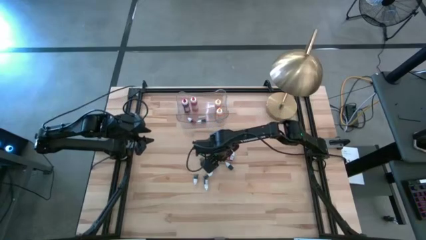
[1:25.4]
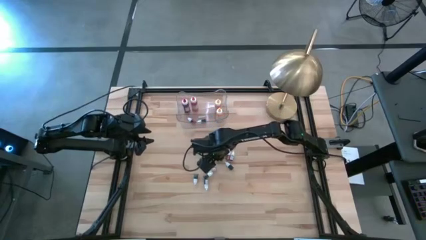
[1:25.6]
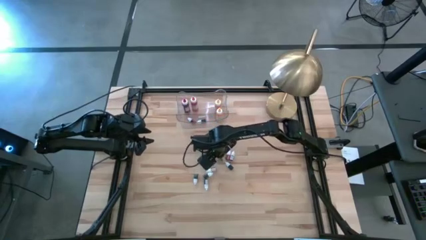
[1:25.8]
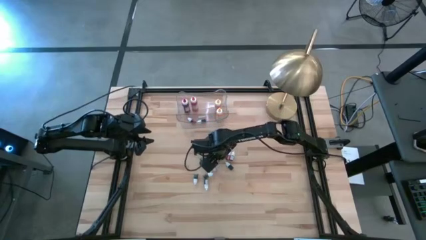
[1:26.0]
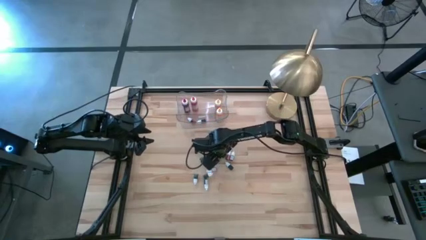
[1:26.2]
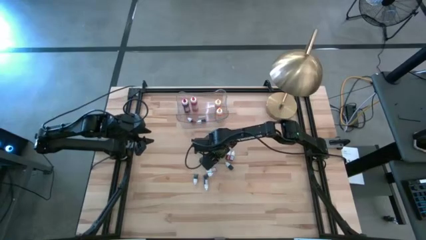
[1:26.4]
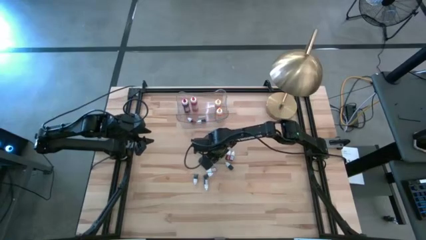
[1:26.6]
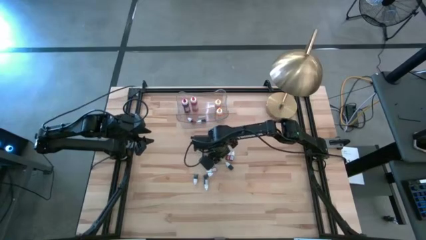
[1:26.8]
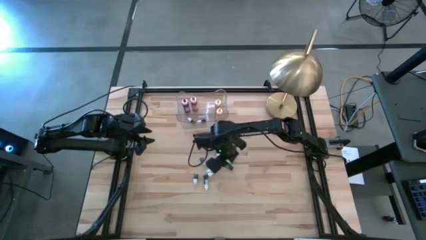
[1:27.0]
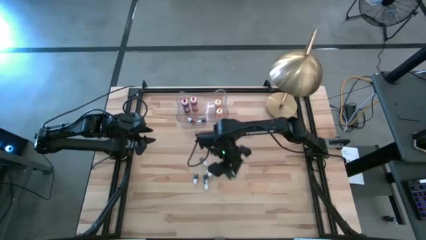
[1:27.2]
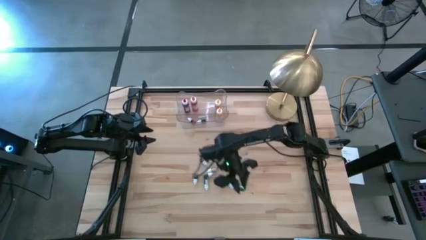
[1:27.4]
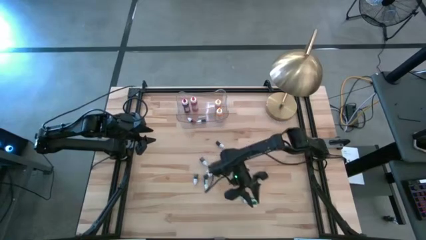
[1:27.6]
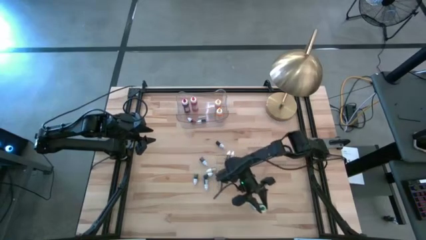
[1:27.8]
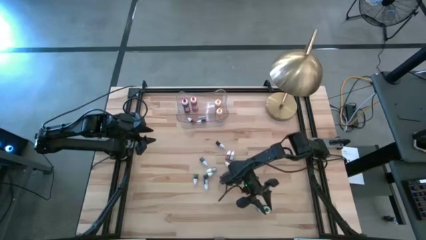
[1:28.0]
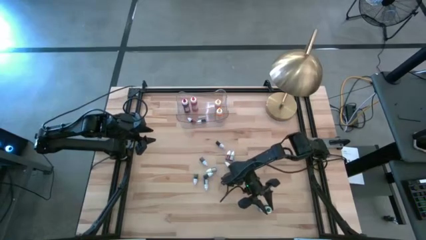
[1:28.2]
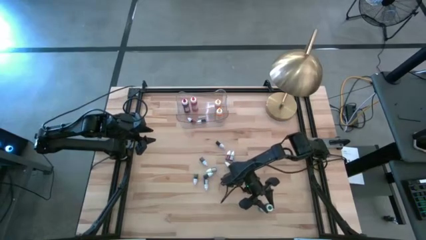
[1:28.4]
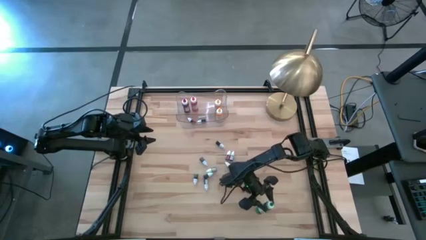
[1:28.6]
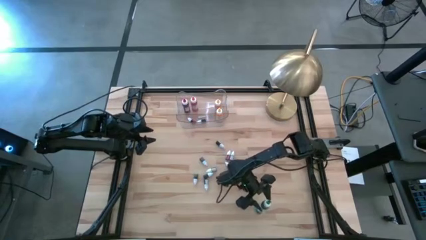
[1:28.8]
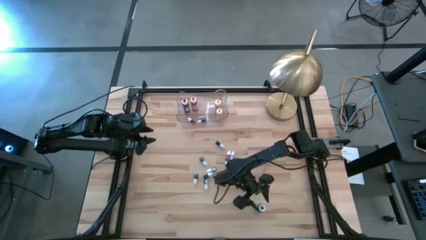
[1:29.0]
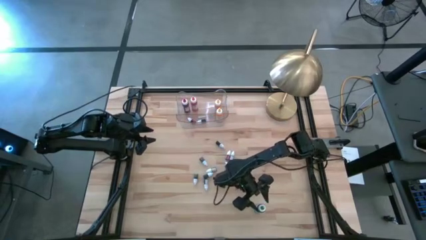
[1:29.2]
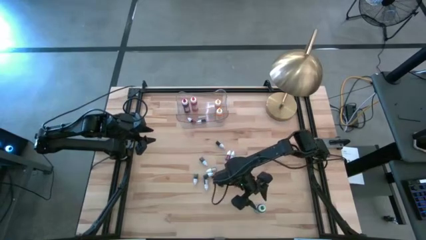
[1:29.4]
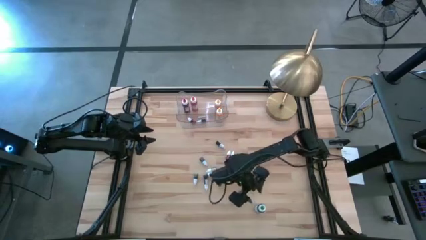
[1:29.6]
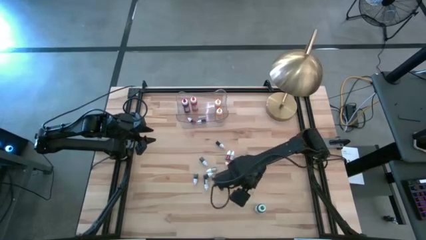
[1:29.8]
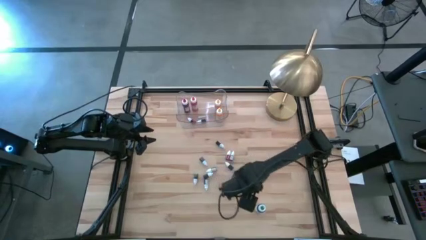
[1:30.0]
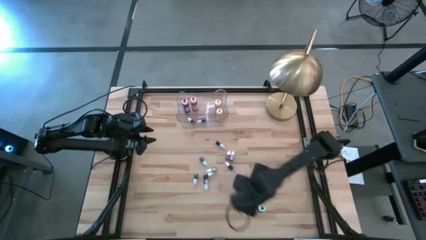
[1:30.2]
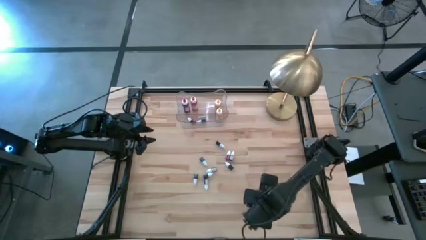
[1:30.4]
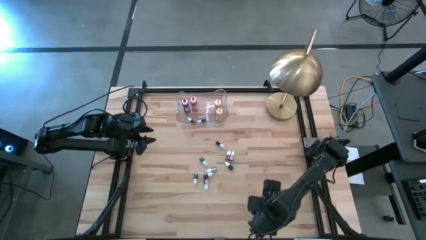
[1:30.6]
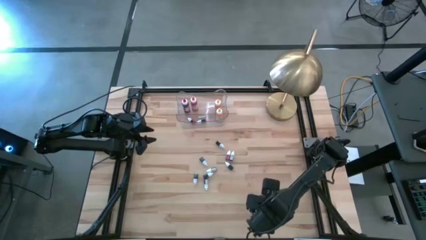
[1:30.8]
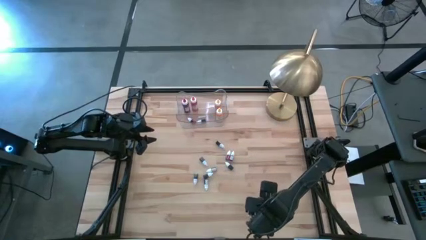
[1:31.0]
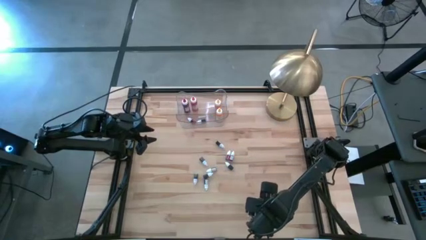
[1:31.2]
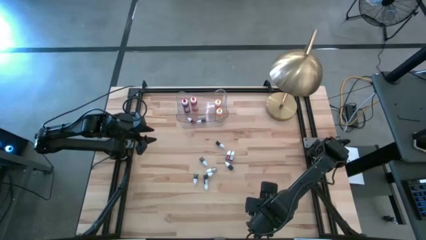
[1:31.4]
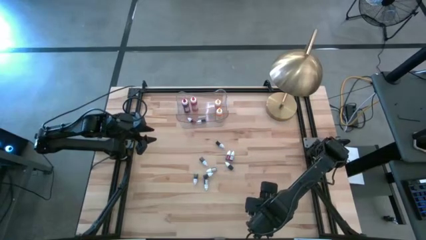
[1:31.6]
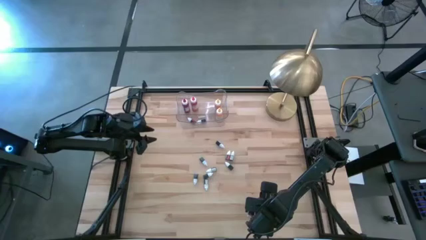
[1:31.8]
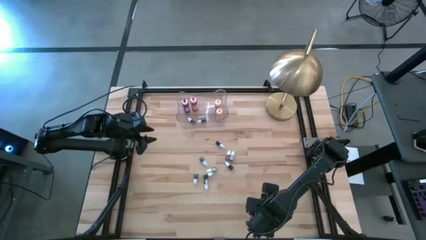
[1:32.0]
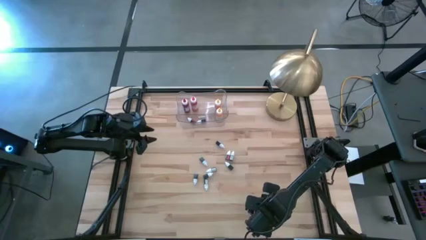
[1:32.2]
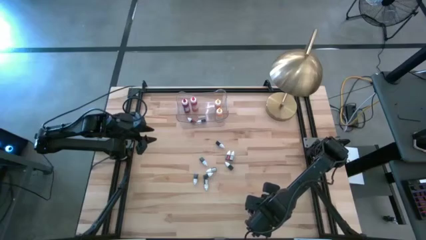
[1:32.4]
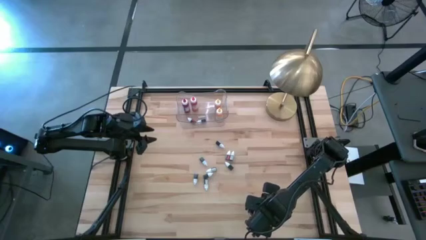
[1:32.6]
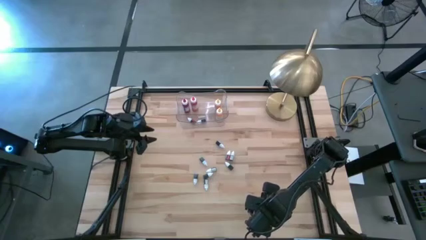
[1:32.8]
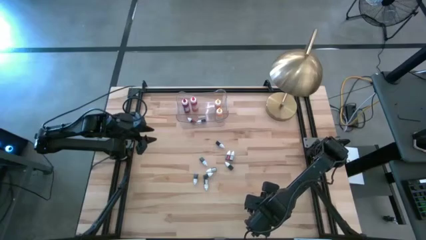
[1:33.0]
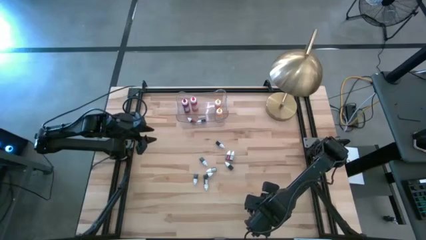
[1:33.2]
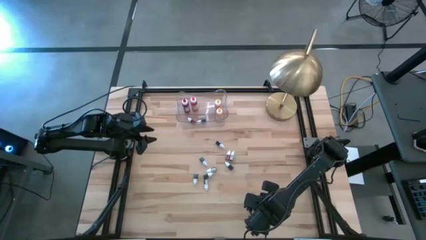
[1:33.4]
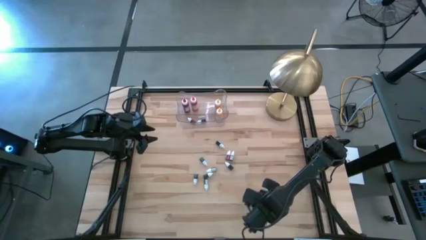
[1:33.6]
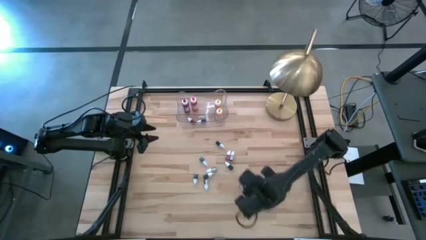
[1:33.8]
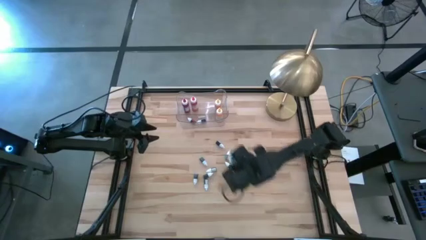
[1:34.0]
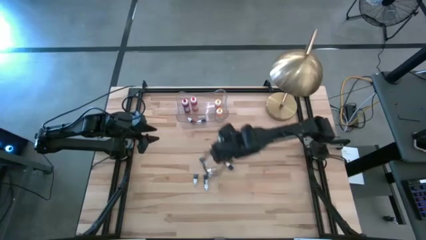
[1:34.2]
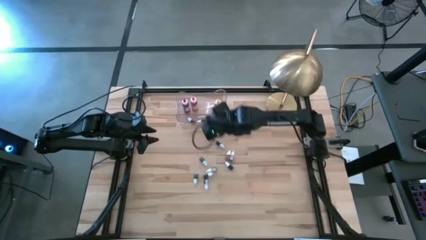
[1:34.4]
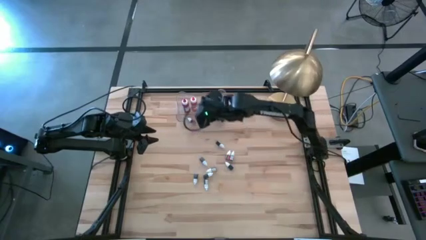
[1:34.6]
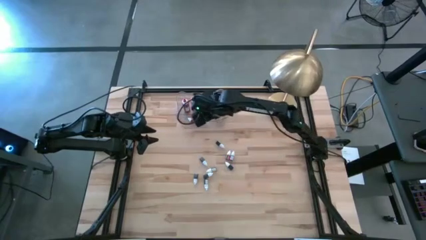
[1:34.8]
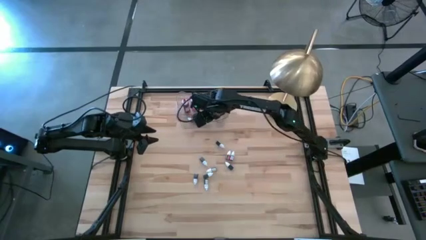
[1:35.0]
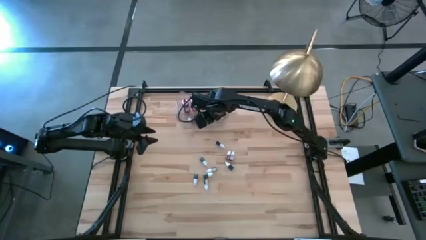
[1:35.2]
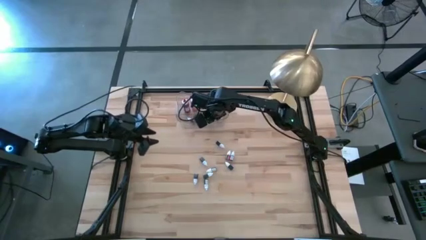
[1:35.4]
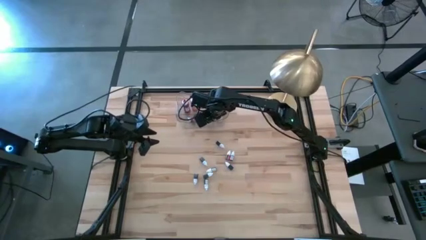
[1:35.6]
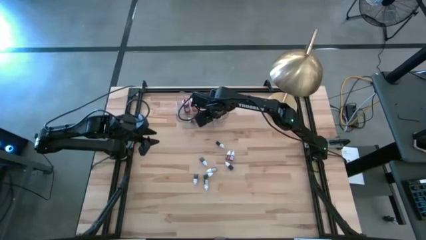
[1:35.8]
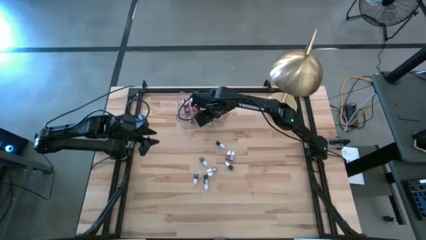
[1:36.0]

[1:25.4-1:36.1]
Task: Pick & Place food coloring
Put the large green food coloring bottle into the transparent bin

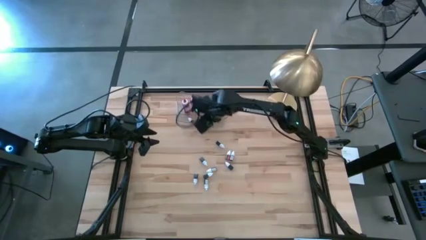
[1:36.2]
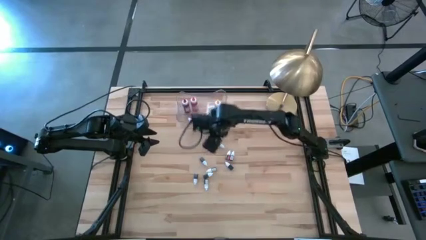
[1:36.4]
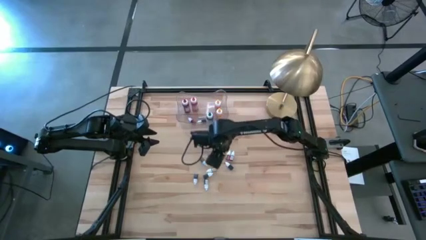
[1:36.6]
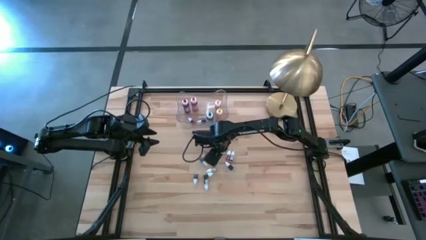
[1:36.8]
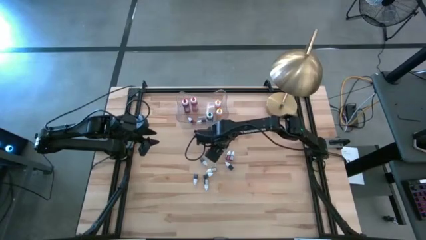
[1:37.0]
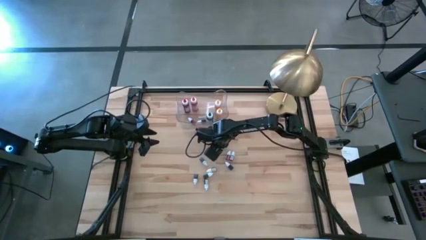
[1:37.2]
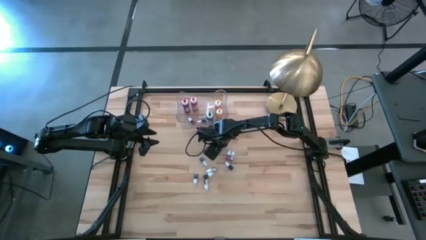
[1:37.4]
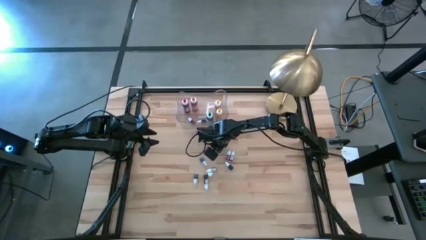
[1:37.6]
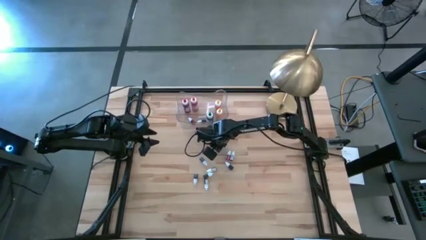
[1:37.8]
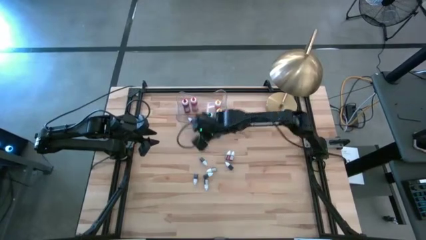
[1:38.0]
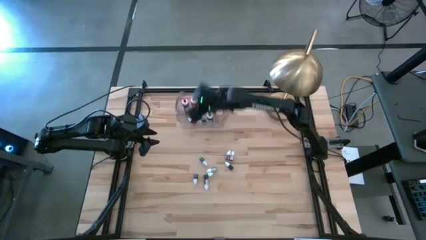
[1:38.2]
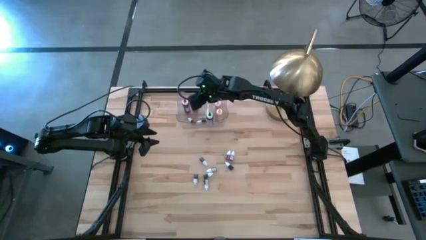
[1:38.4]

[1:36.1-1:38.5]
Put the small black food coloring bottle into the transparent bin

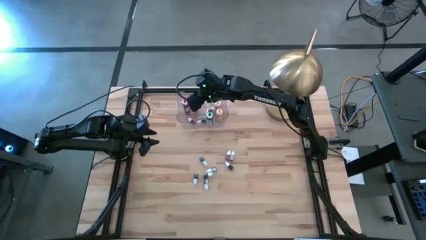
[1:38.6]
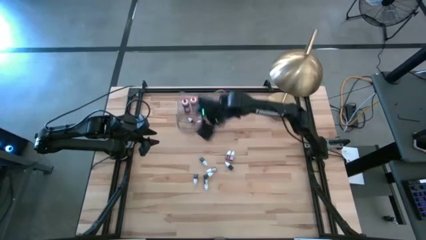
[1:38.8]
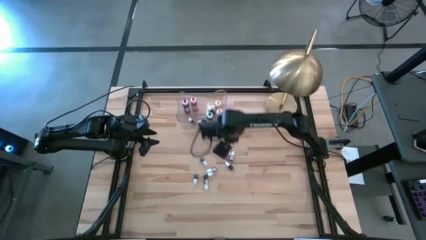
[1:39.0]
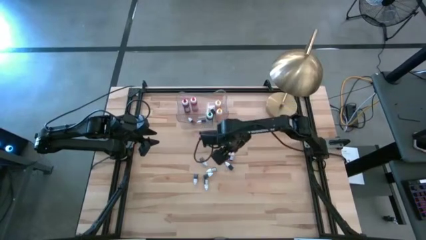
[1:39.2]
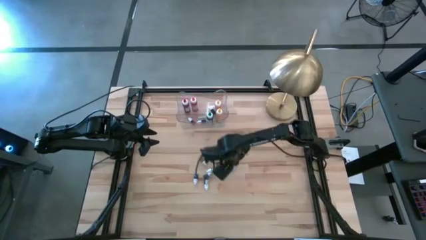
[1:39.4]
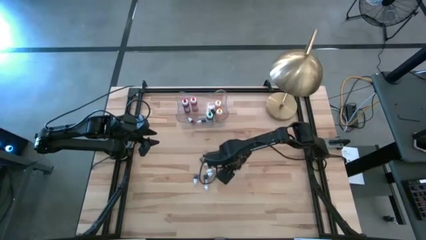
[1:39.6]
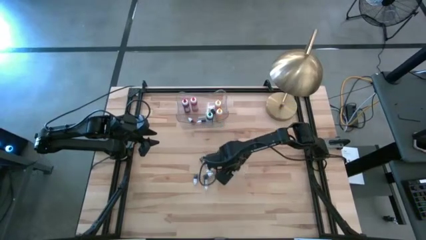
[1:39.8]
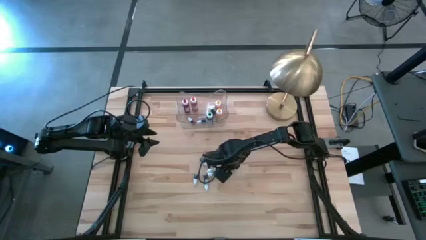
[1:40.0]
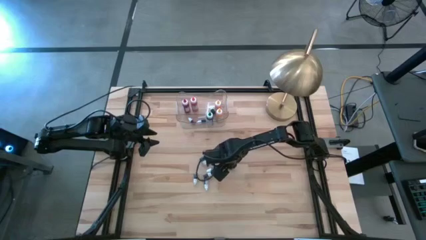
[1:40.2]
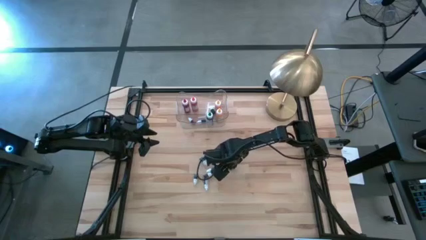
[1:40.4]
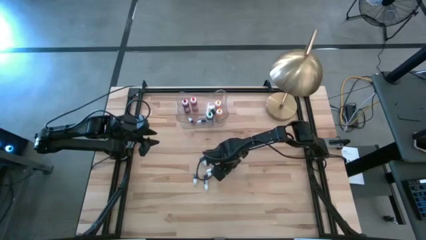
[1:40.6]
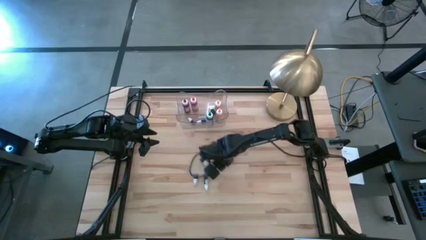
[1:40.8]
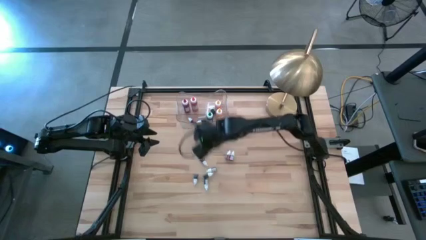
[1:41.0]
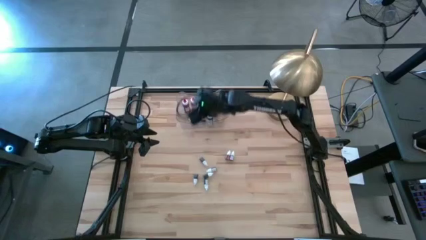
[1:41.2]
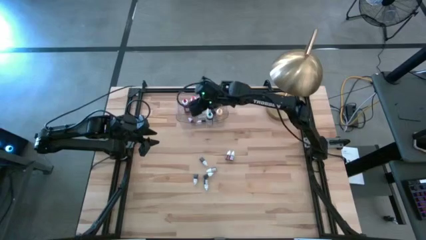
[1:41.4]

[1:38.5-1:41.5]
Put the small green food coloring bottle into the transparent bin

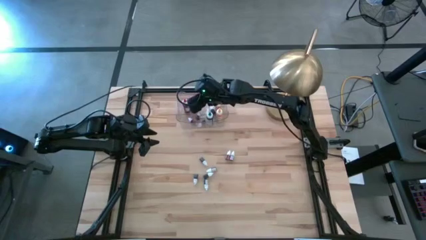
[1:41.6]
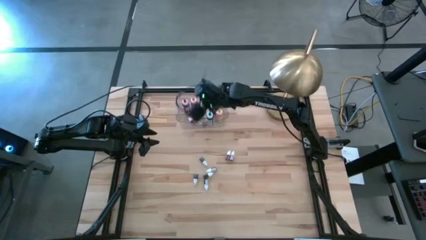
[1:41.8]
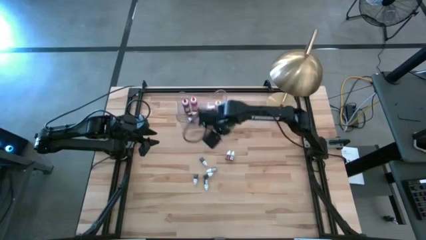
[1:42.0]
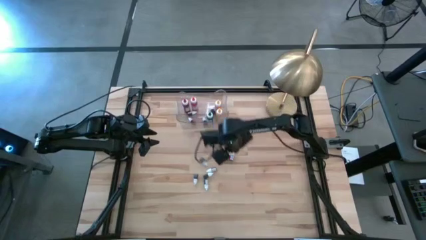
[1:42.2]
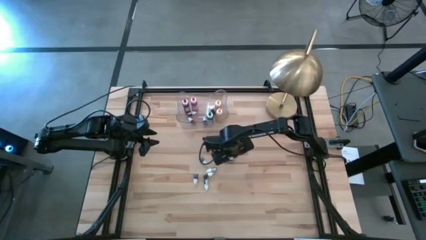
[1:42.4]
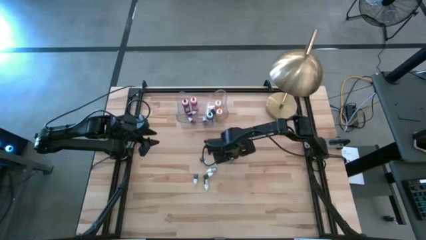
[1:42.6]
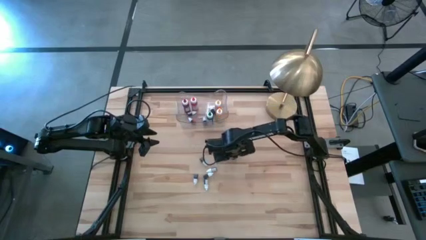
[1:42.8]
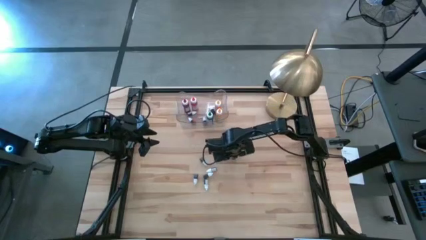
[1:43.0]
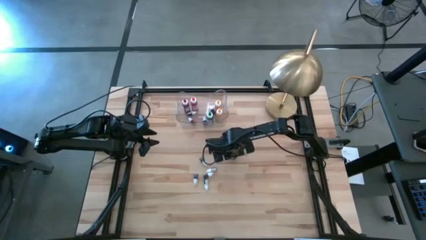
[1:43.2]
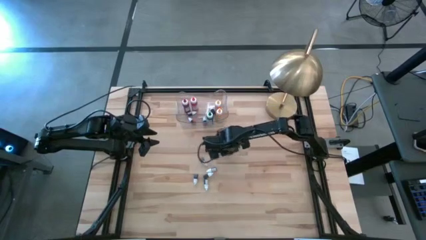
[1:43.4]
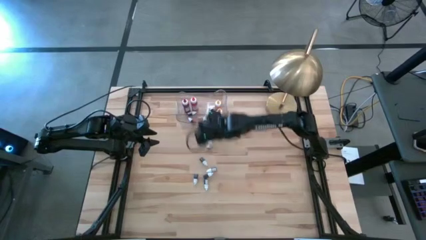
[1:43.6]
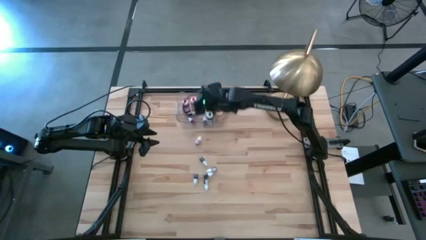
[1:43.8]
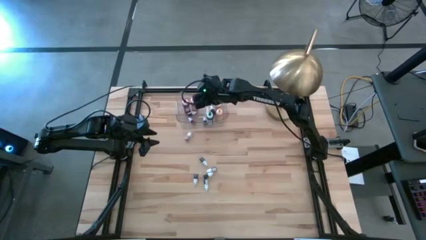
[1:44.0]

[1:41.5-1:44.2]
Put the small red food coloring bottle into the transparent bin
